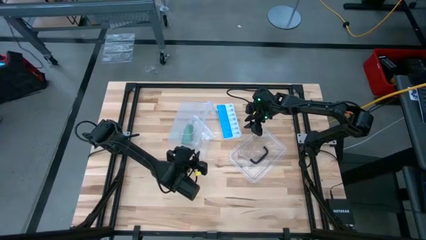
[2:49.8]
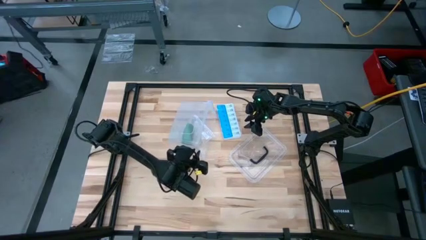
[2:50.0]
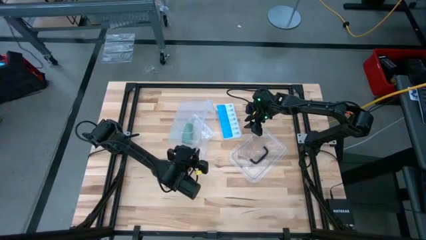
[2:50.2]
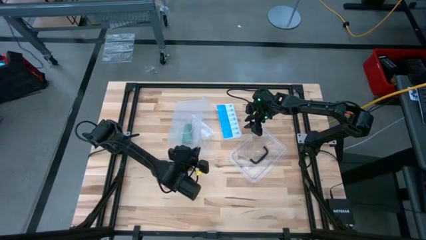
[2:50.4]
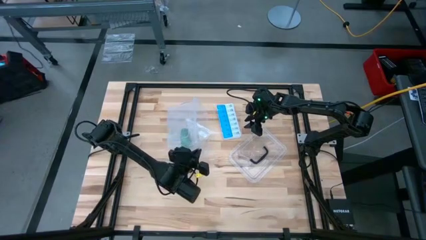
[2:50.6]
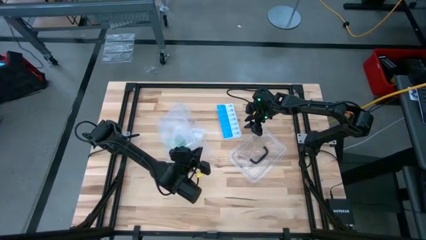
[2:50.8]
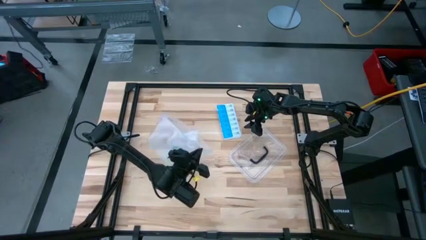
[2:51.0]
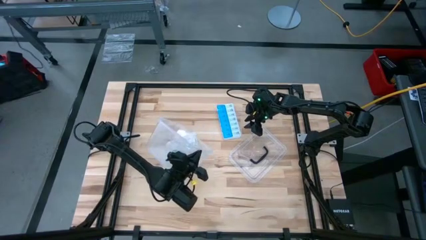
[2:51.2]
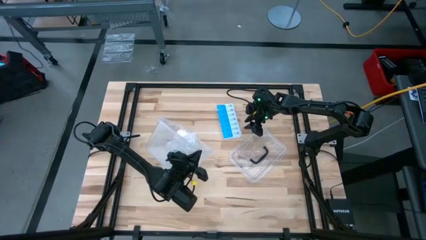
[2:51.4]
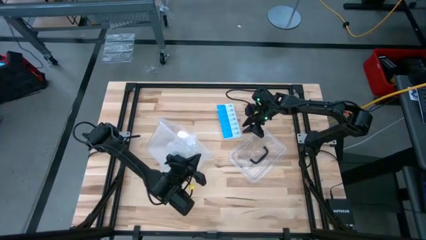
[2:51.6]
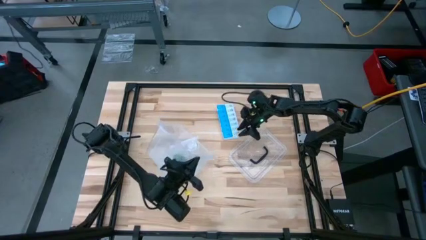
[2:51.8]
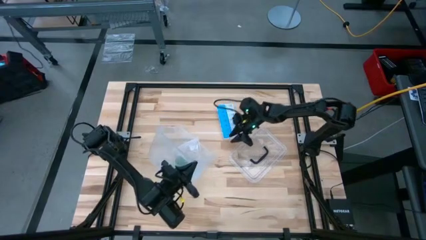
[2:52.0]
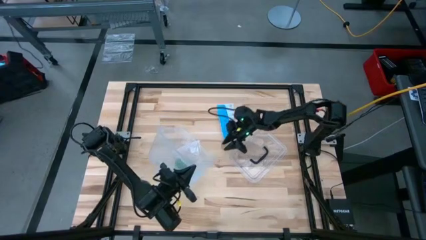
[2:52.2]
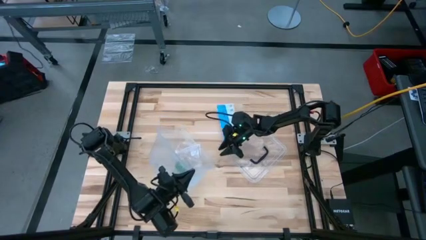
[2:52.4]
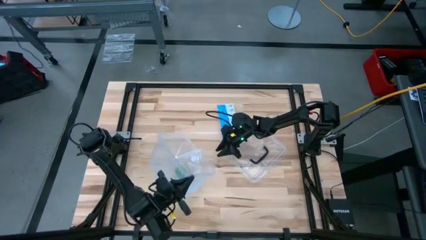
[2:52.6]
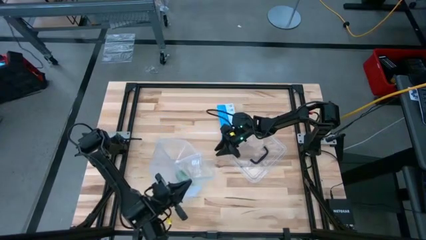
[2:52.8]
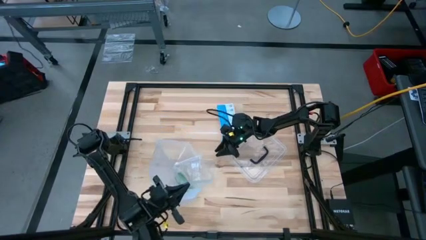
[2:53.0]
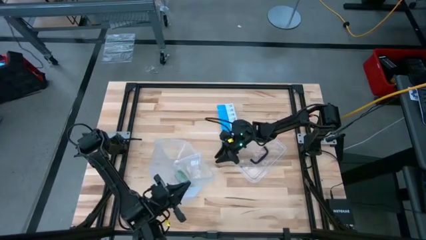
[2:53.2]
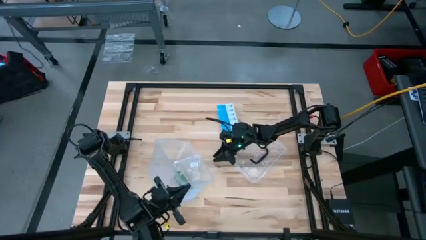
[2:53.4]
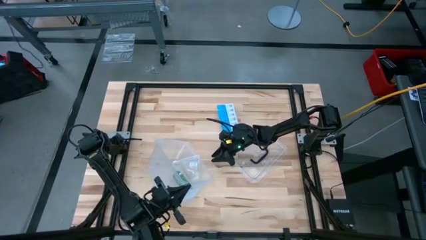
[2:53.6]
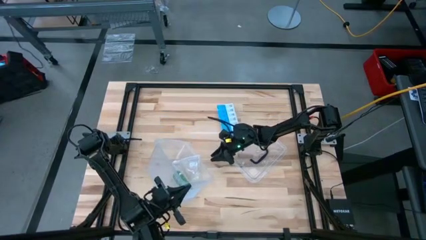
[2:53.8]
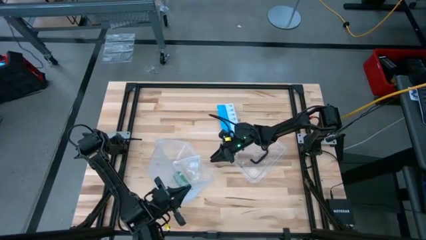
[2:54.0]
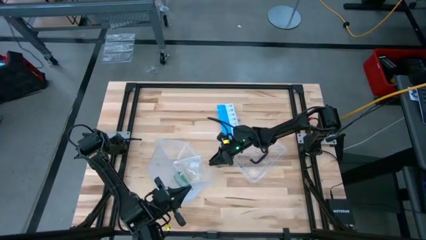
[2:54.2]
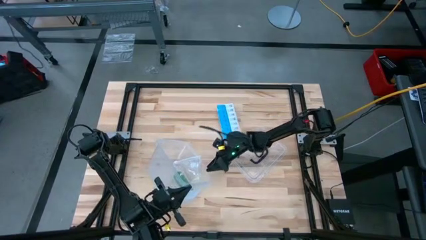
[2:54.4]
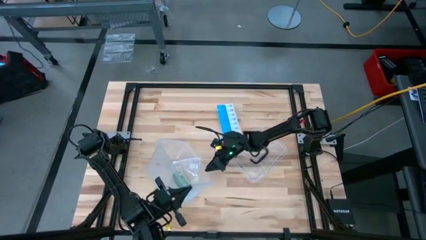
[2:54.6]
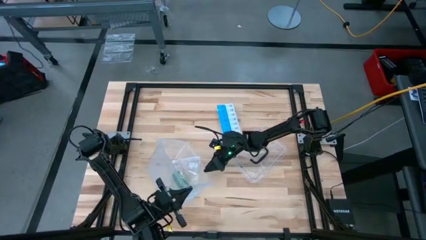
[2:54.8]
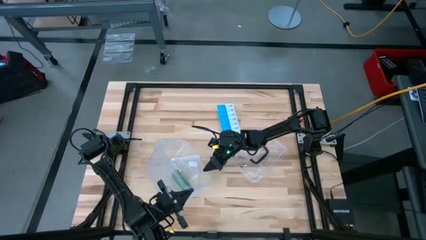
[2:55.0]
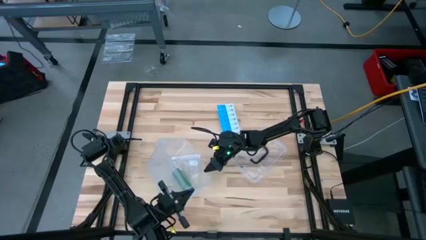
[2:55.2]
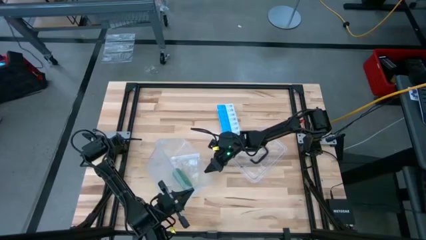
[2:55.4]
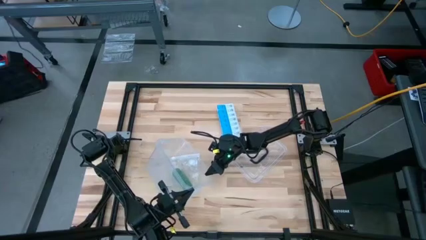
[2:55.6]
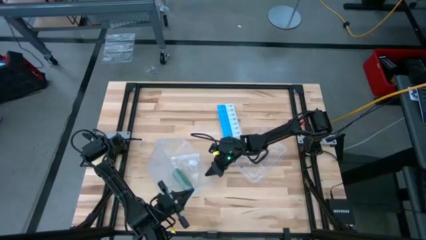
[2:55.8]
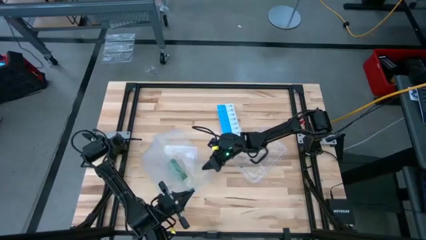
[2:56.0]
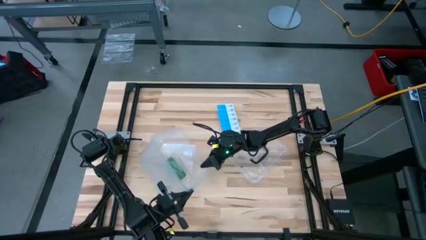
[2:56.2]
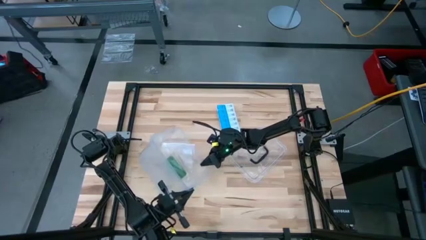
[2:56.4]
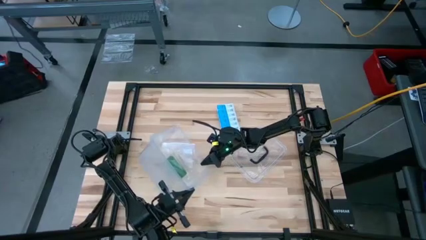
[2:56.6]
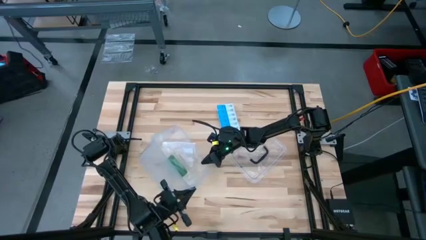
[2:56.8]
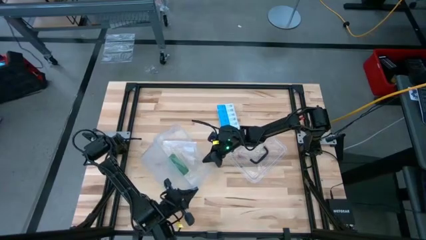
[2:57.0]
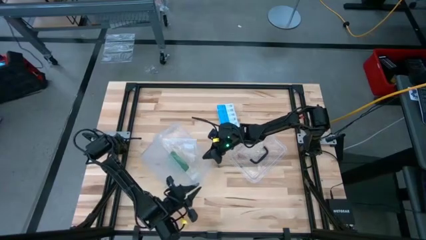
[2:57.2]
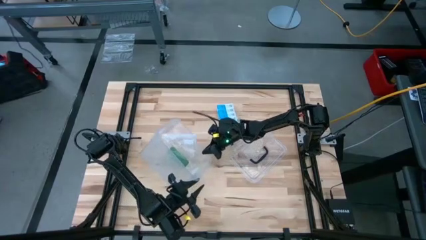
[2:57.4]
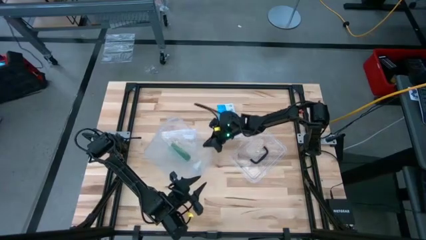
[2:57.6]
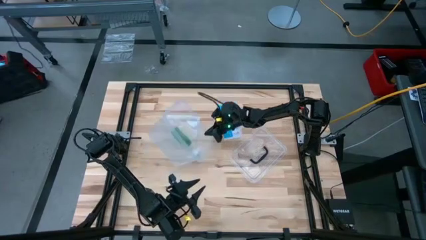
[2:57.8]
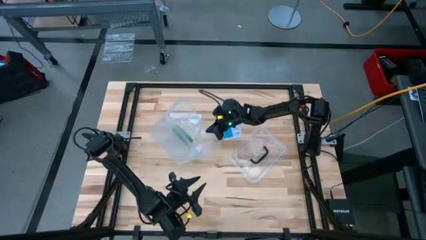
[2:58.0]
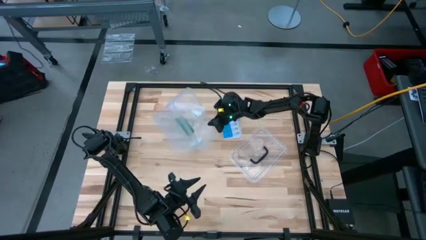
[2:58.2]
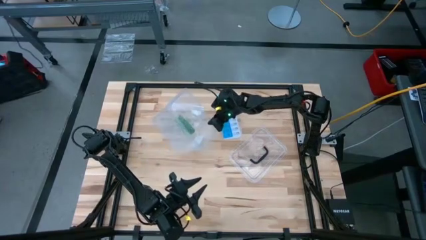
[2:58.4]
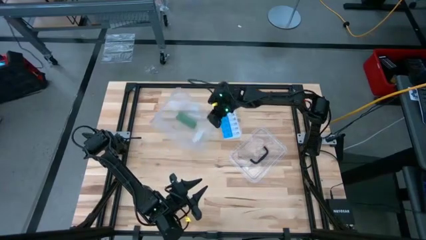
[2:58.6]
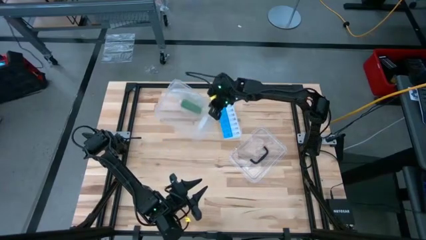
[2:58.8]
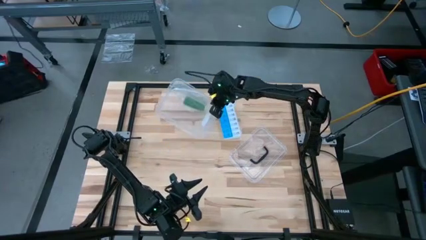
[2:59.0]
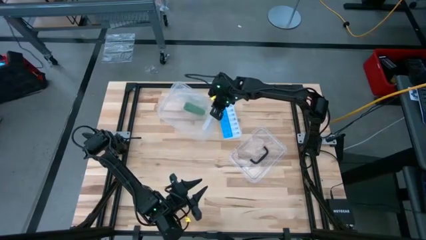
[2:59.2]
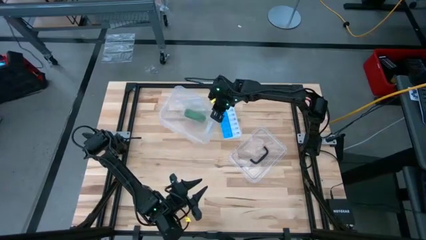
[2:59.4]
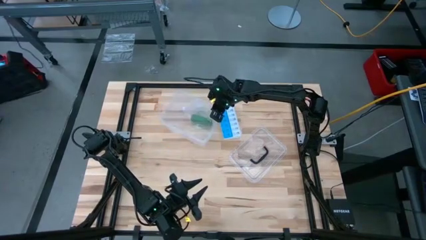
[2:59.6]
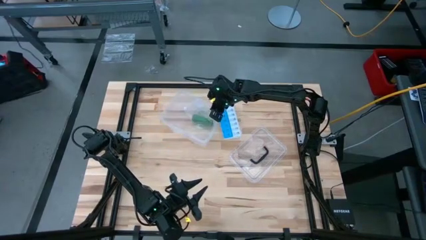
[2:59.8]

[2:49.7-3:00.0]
Task: Roll bandage
Adjust the transparent bin

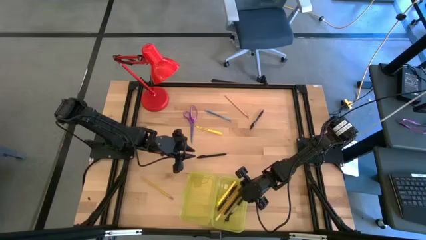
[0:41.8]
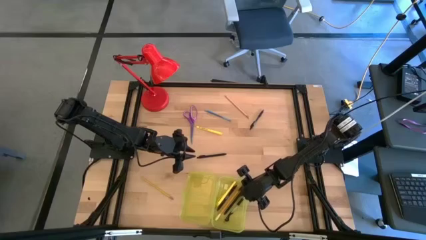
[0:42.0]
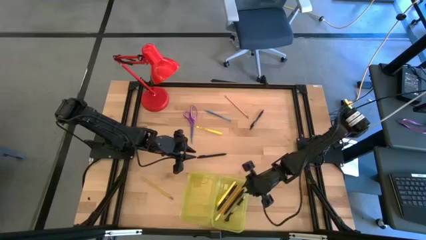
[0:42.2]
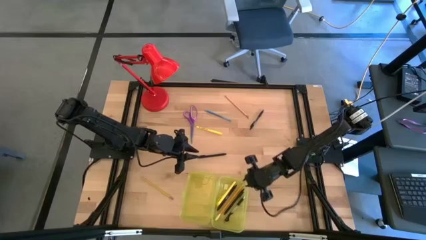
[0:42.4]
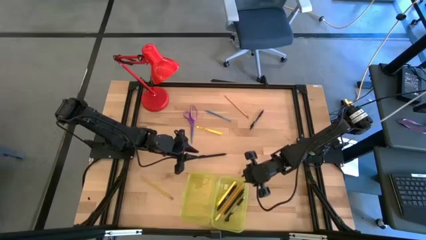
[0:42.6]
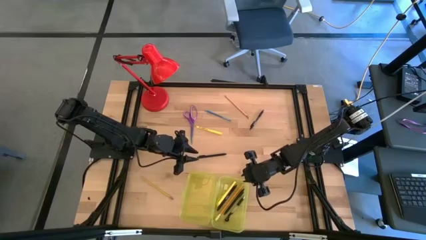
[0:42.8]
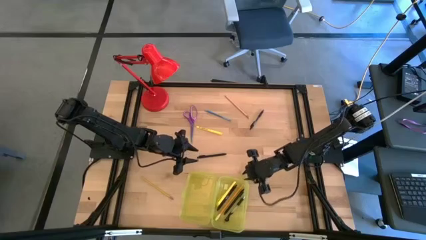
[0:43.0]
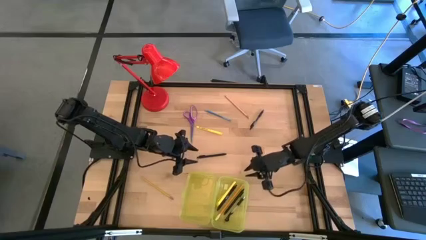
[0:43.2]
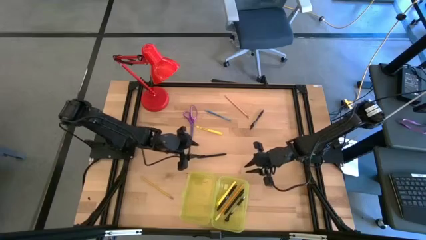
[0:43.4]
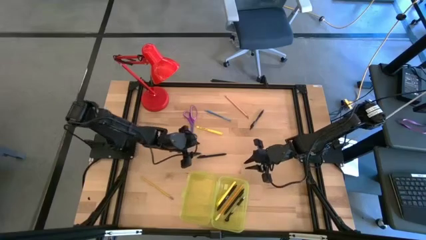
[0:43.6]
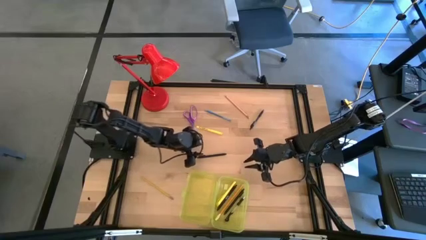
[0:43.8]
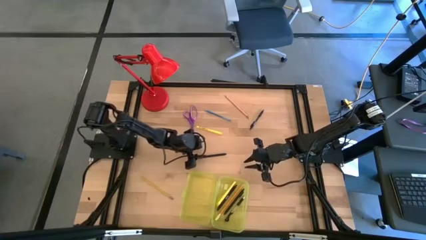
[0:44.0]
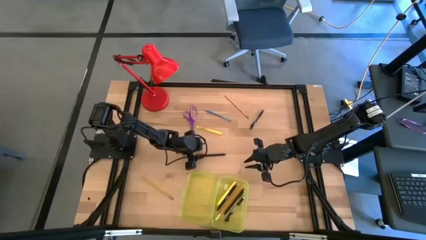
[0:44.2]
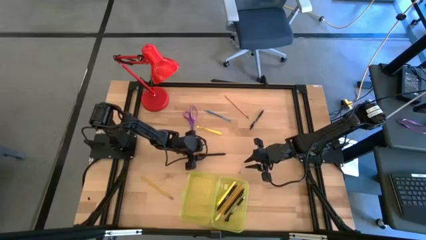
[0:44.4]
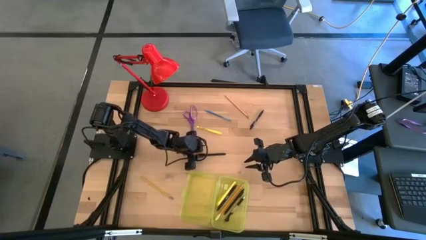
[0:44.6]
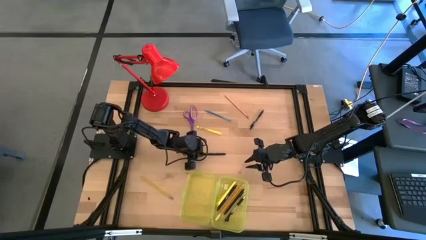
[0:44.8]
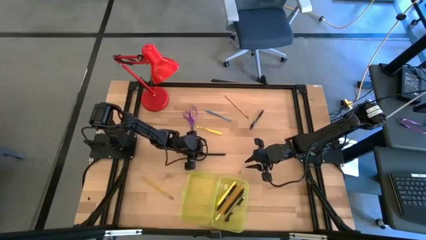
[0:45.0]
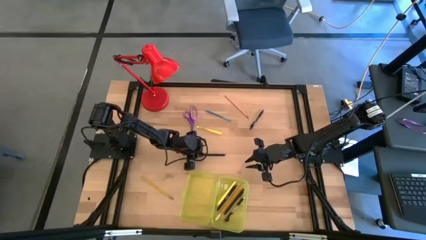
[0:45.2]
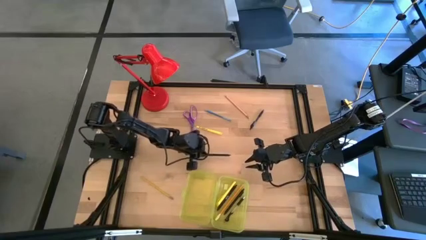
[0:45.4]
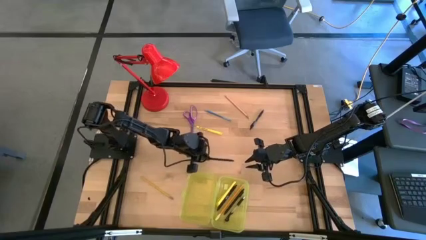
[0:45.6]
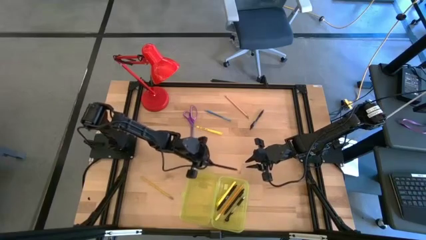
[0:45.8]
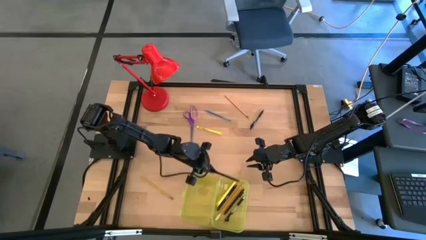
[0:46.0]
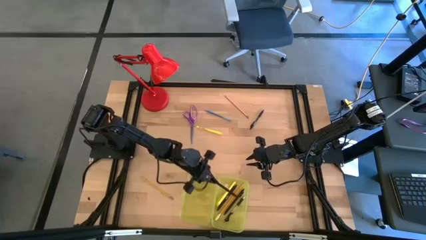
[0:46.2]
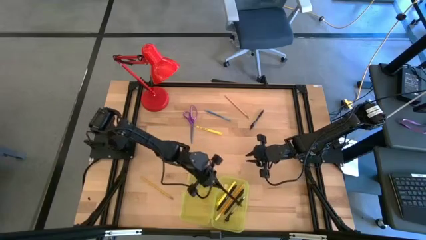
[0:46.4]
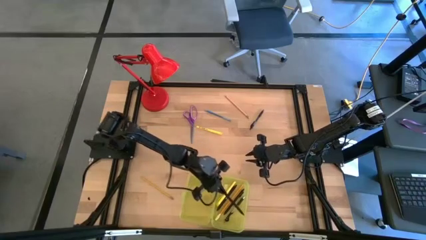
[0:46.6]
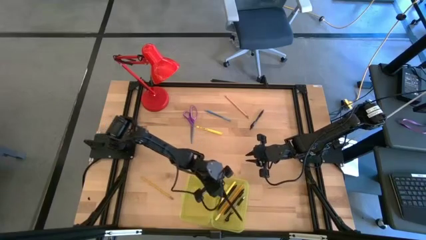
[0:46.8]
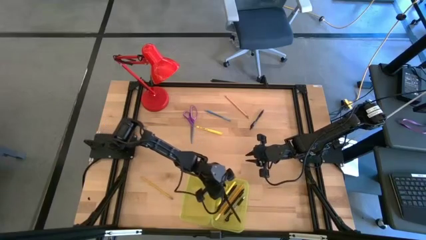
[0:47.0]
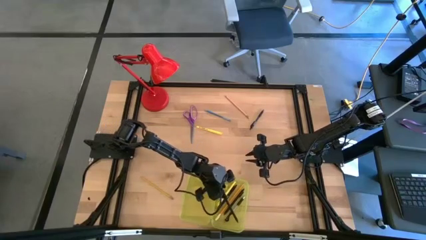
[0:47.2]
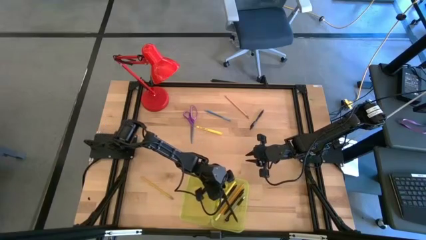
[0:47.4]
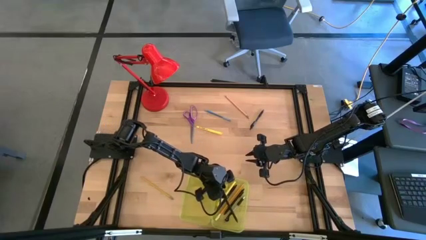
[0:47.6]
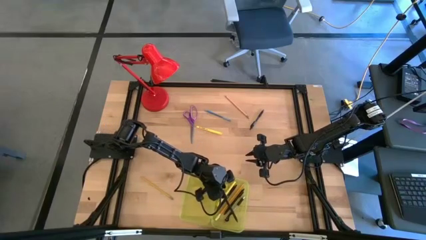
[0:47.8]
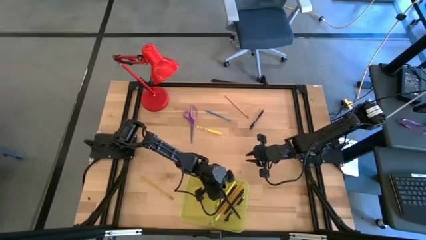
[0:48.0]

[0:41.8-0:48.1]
Task: Pick & place school supplies into a supply box
Put the black pen into the yellow supply box
